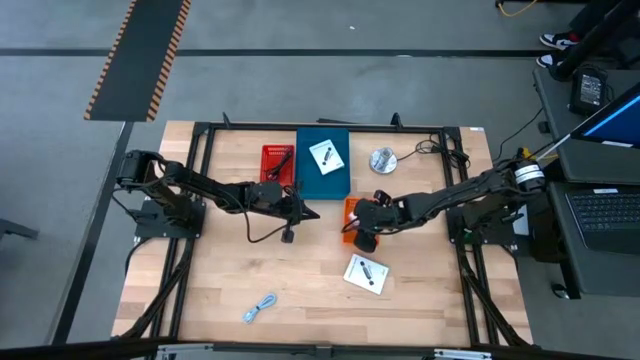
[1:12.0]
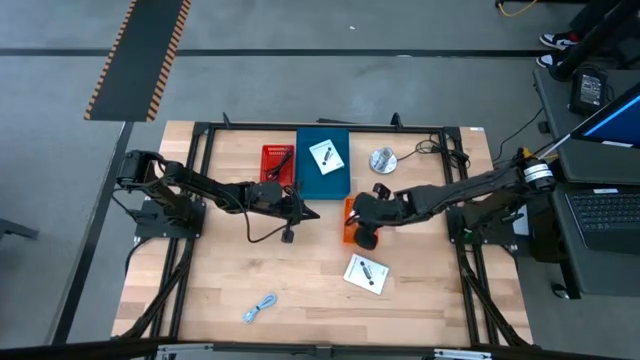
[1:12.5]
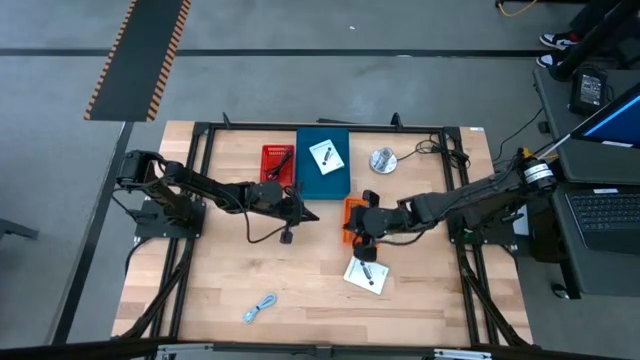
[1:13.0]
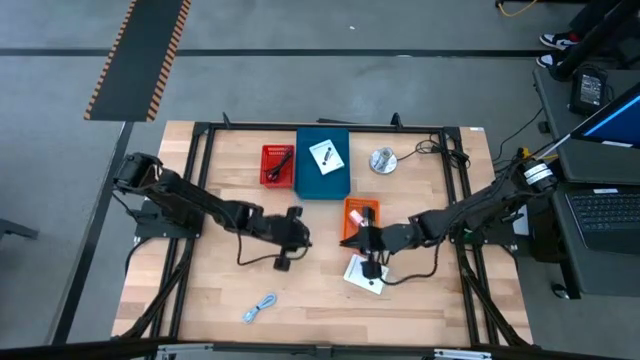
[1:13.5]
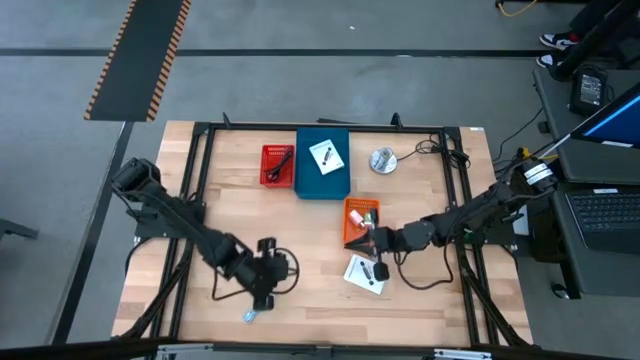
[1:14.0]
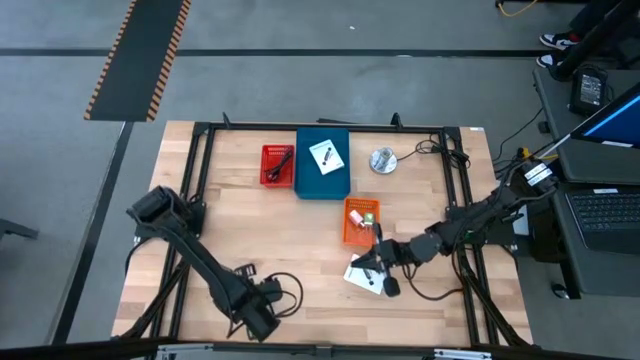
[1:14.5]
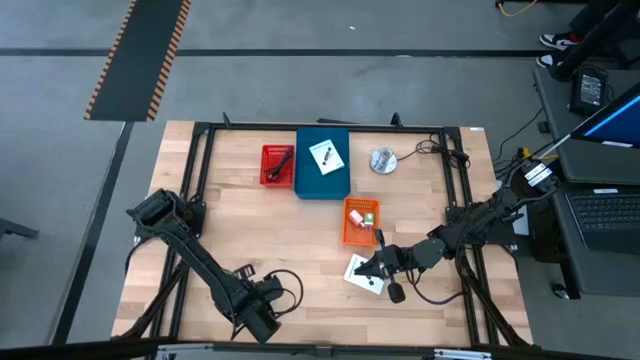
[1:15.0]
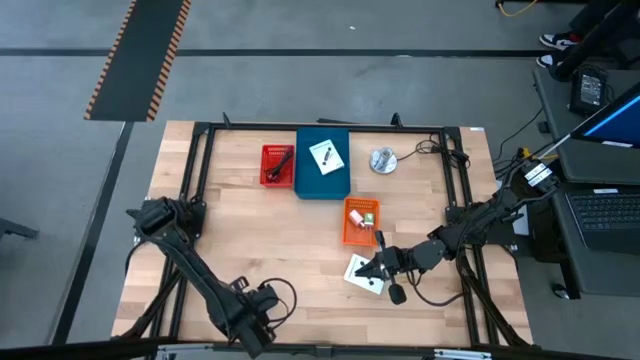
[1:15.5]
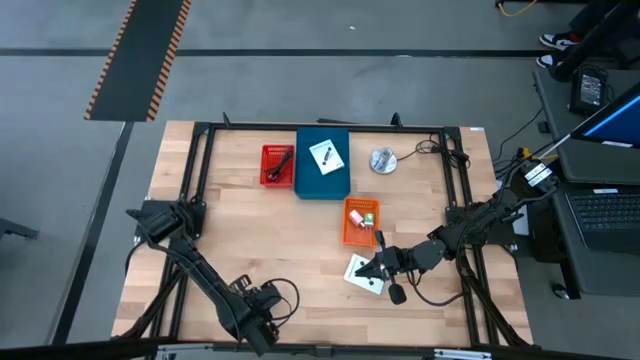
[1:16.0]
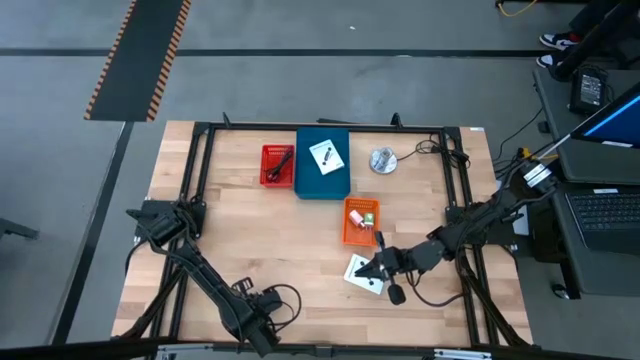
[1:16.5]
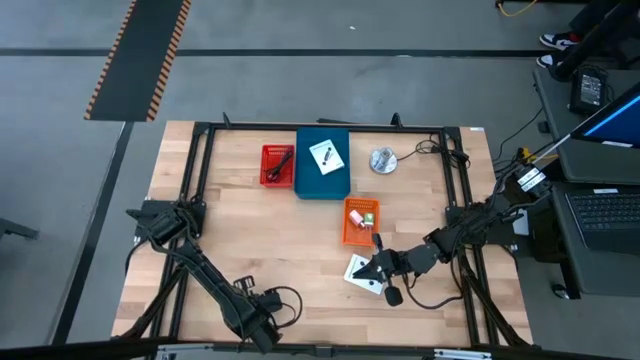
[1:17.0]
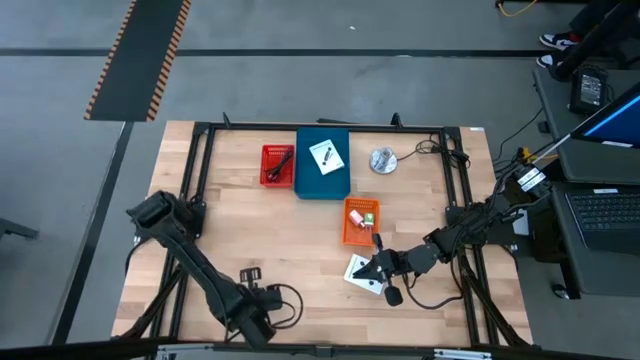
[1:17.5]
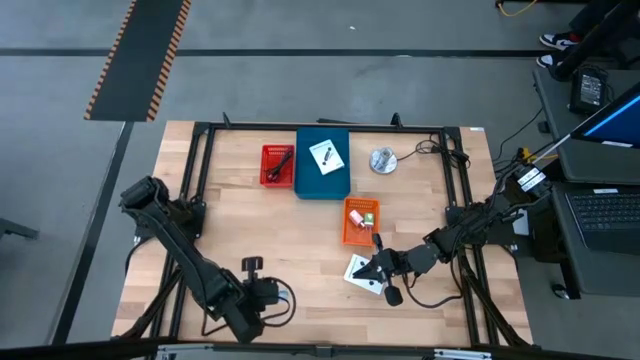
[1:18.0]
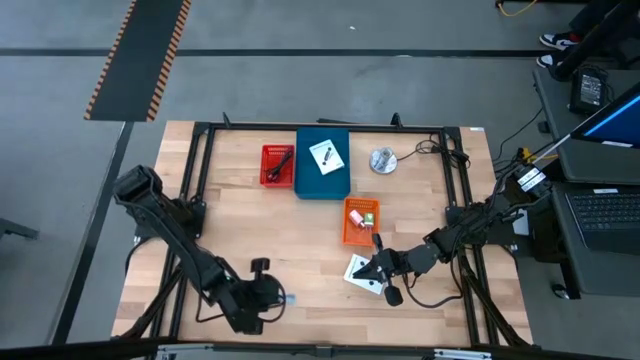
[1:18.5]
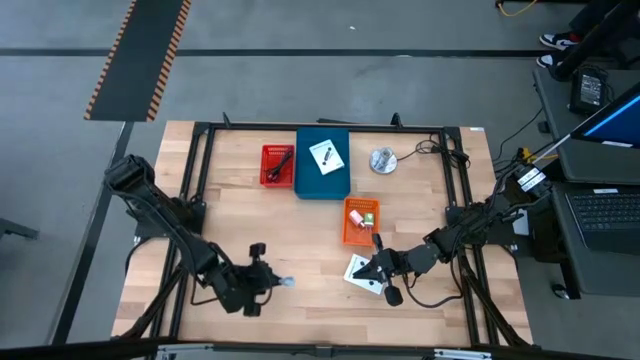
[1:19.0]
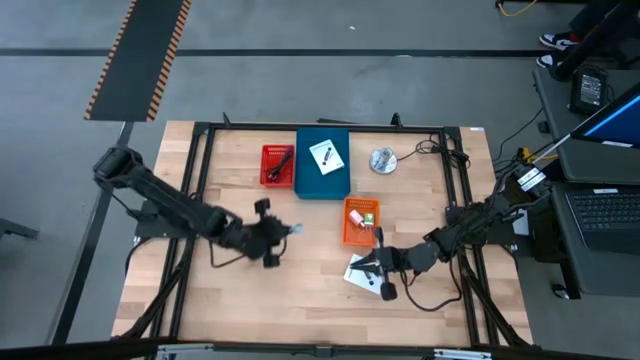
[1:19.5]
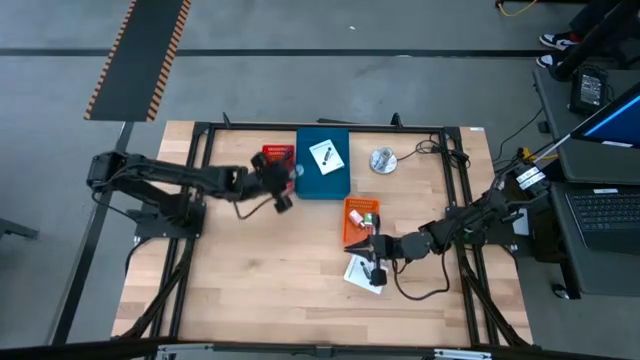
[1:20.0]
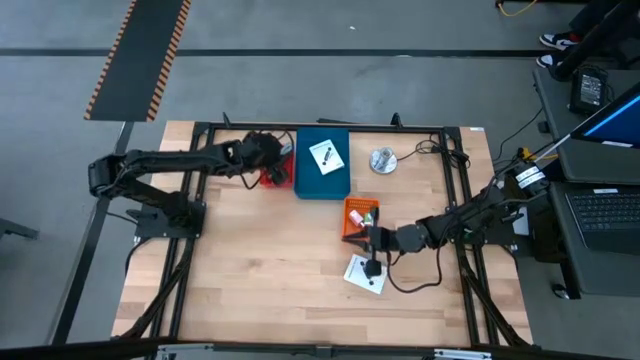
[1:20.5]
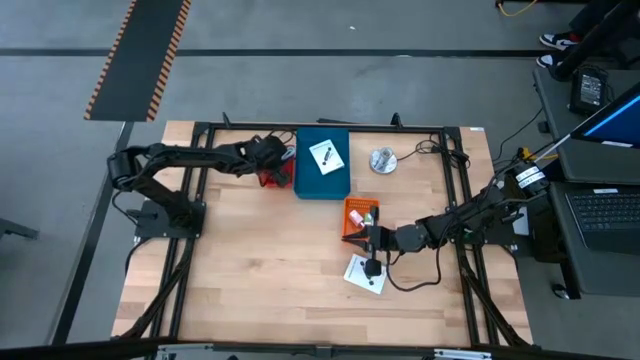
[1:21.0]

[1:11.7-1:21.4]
Task: Pick and place items into bin
Put the light blue charger cable into the red bin

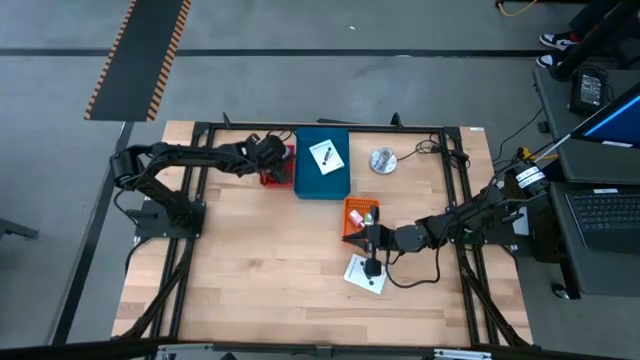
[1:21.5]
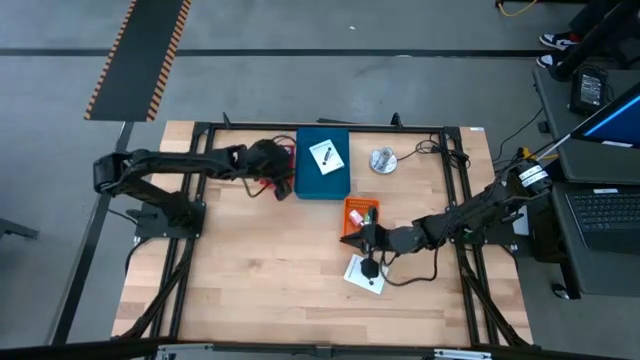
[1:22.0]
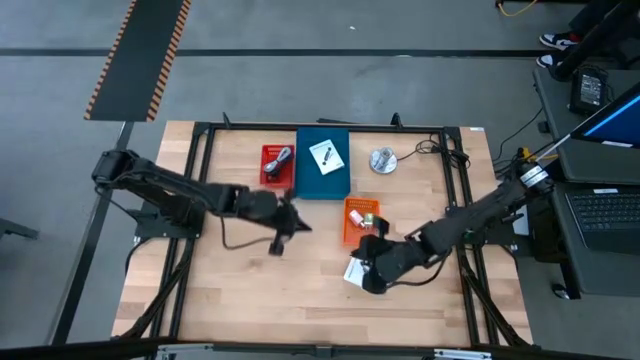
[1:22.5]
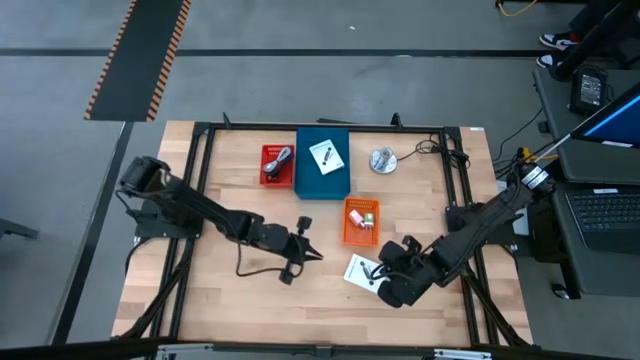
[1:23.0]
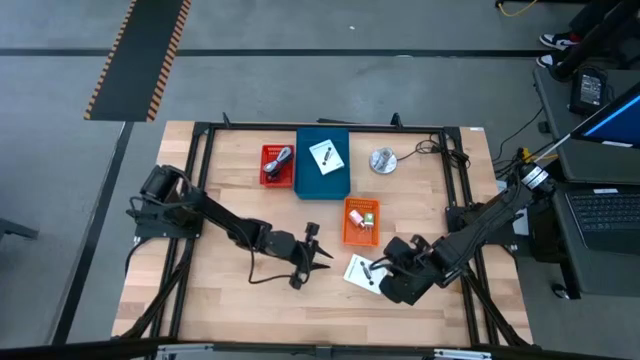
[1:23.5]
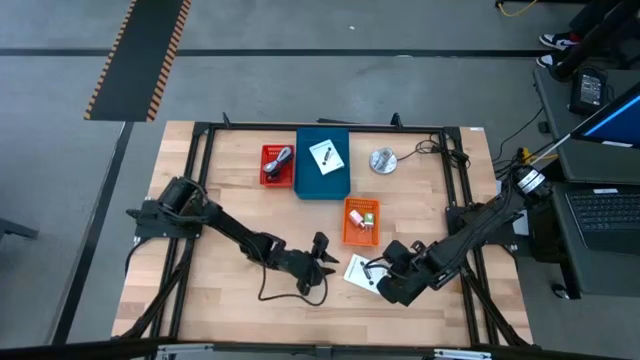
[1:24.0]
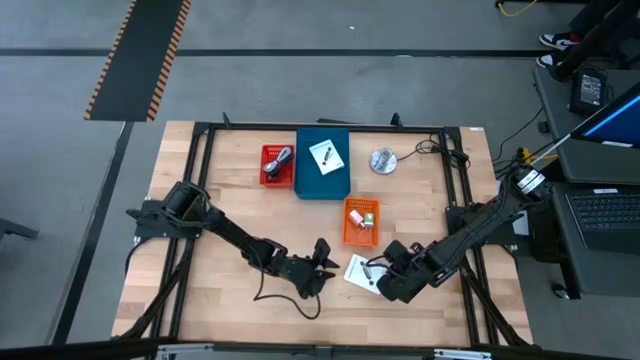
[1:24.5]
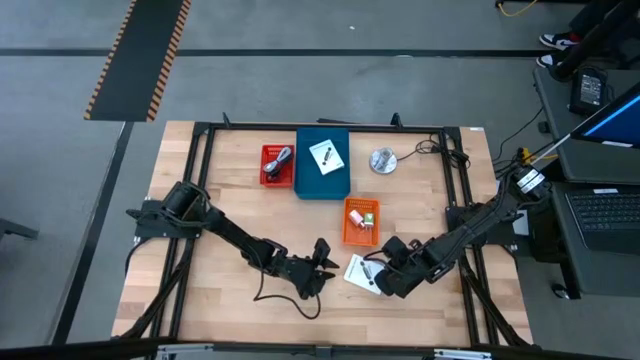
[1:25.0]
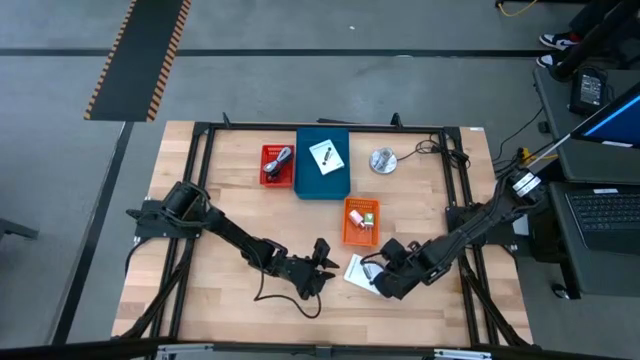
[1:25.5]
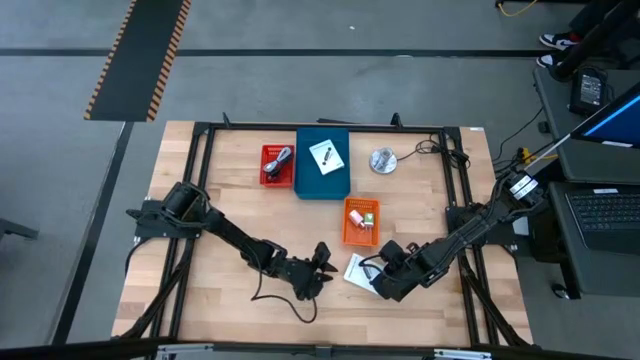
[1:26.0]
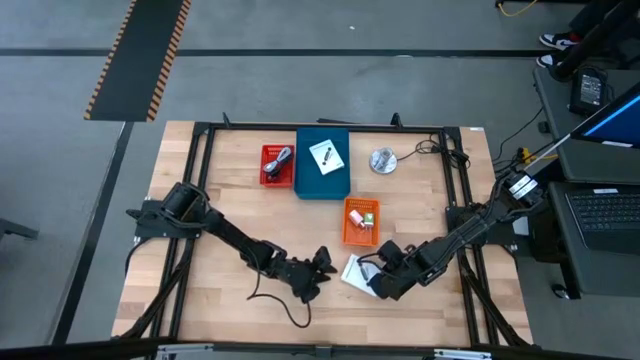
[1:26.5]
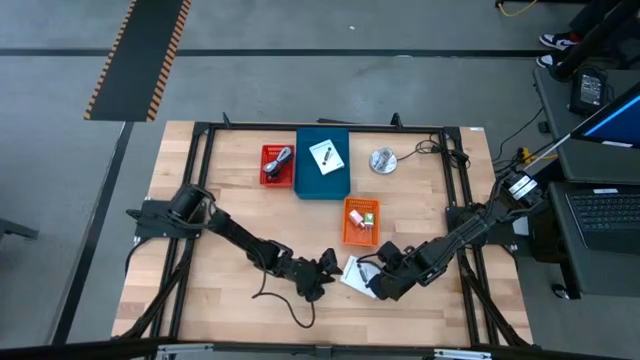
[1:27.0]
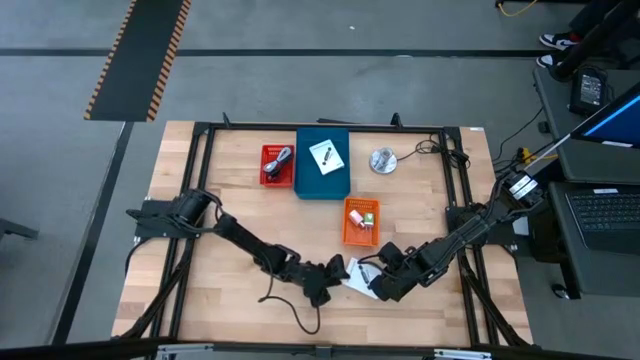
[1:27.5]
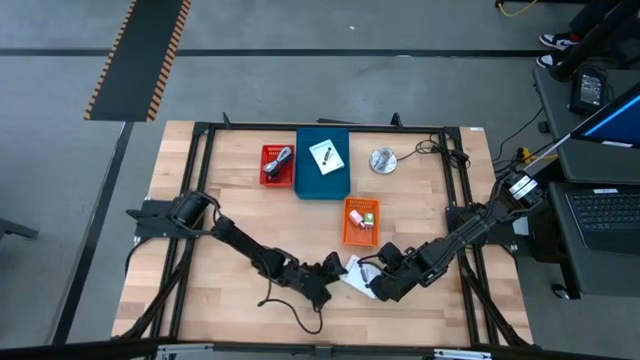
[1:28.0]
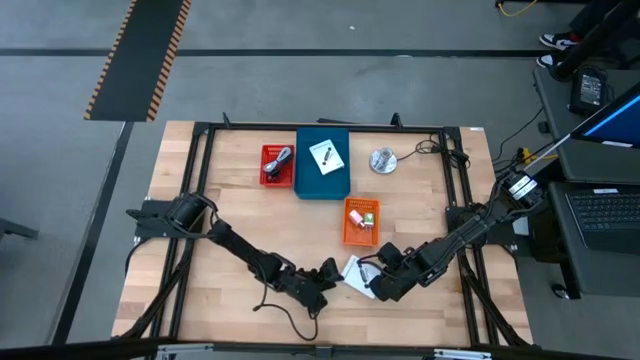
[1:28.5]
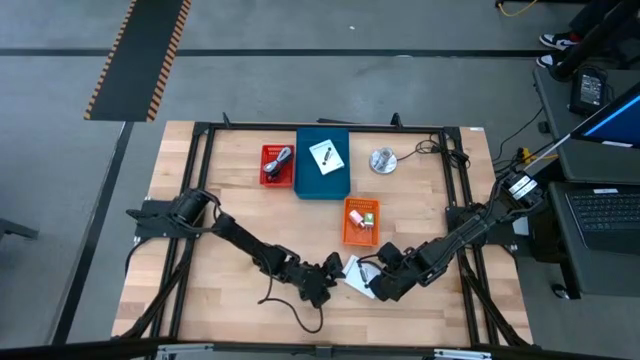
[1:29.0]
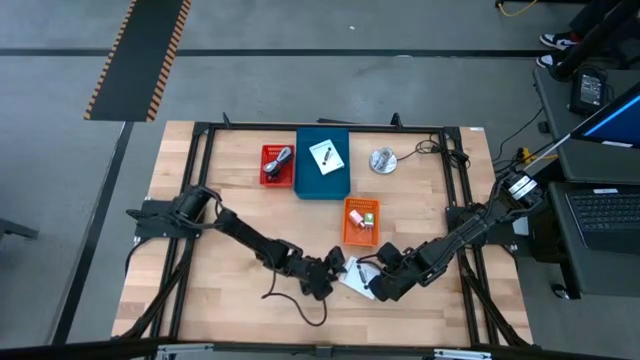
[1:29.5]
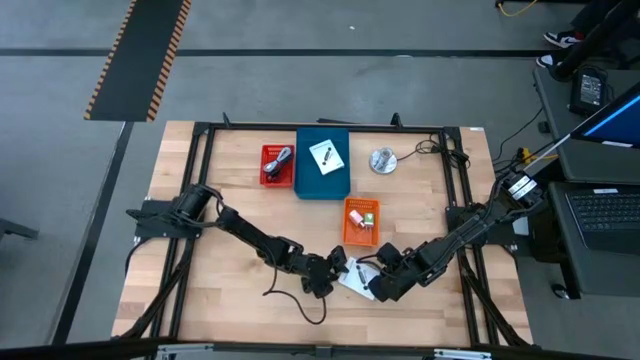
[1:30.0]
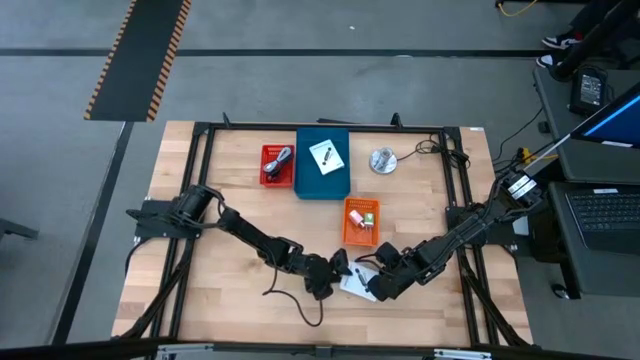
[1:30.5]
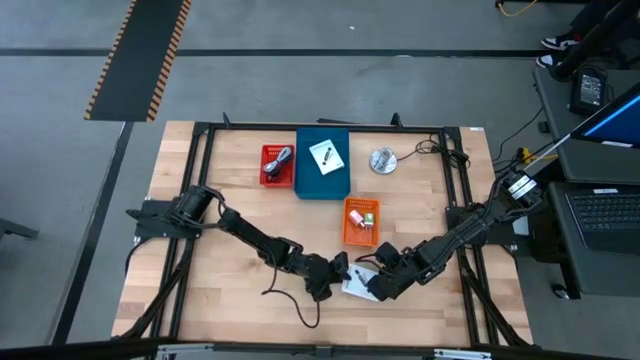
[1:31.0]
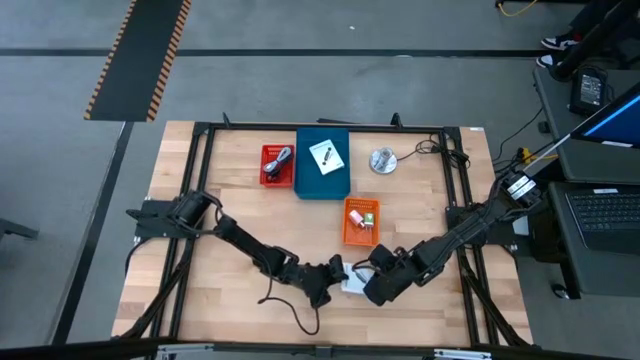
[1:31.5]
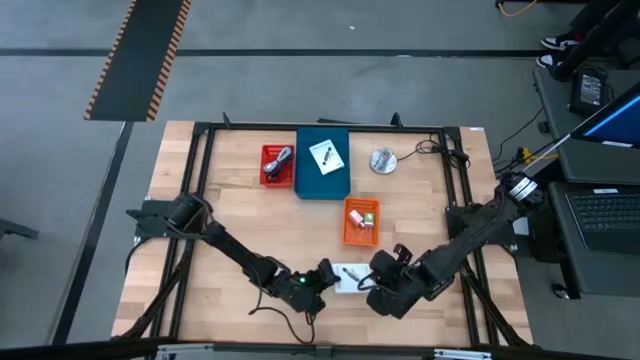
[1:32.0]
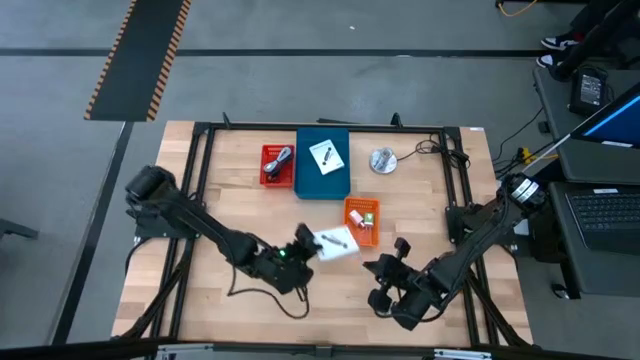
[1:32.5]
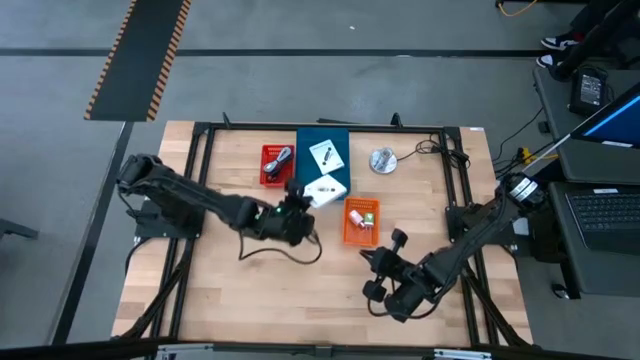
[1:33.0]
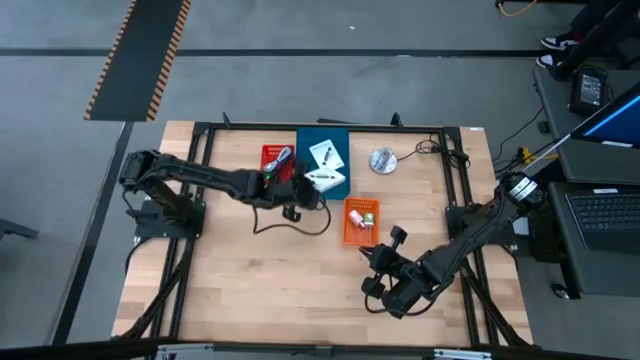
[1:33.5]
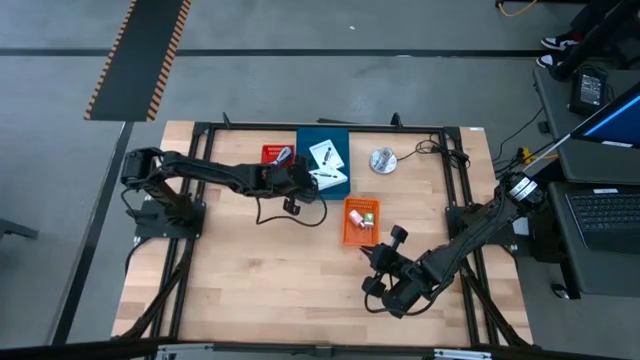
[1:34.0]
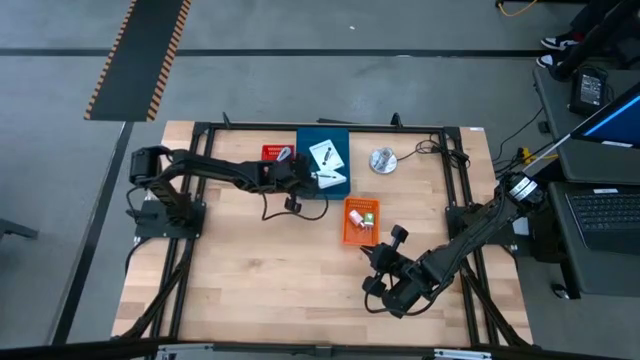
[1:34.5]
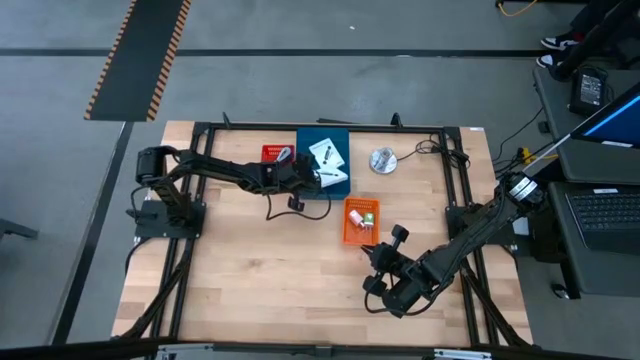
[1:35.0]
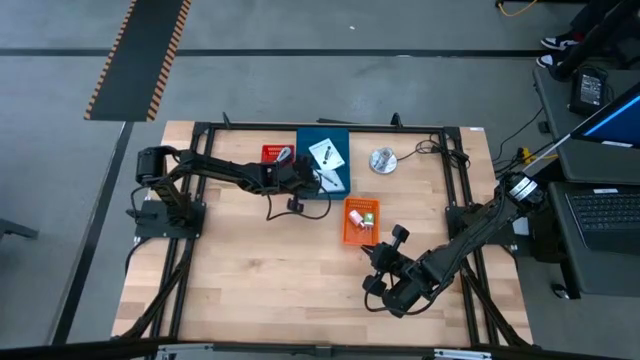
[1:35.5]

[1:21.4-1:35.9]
Put the card reader box into the blue bin
